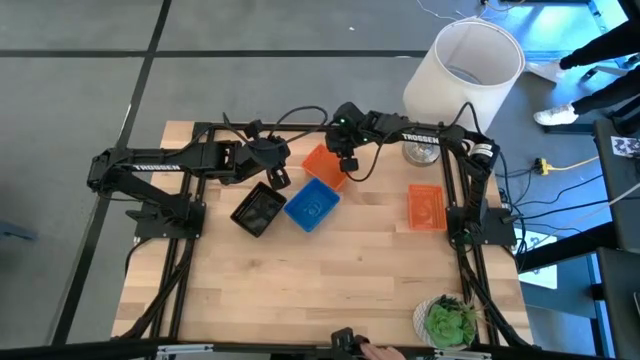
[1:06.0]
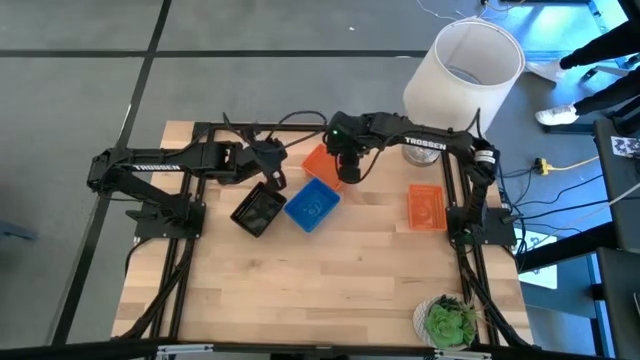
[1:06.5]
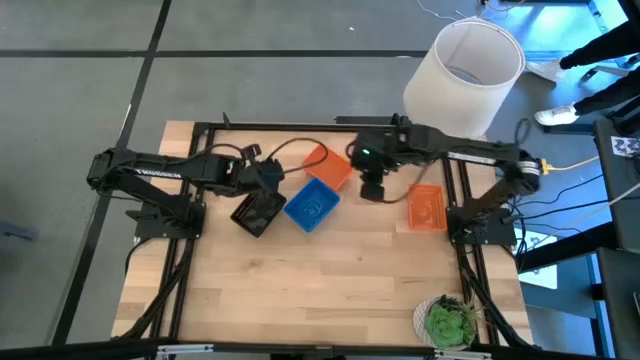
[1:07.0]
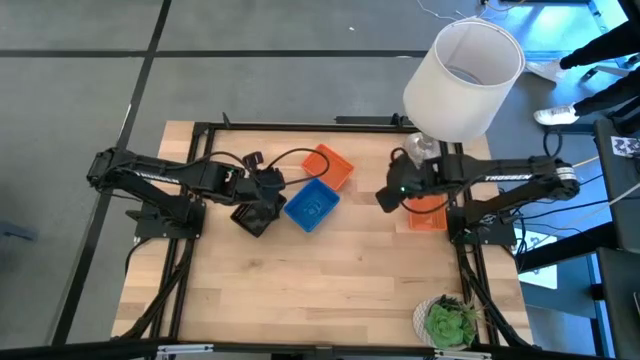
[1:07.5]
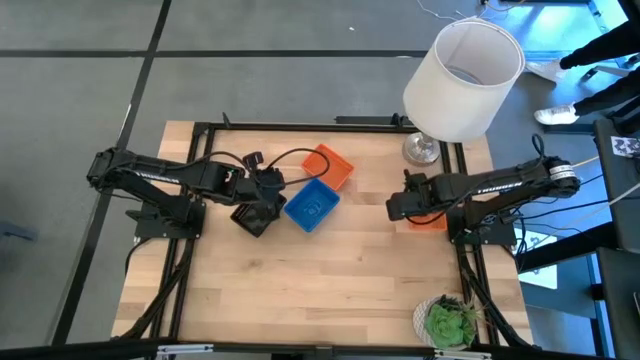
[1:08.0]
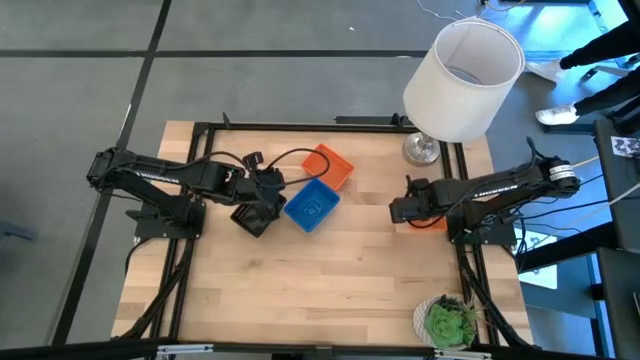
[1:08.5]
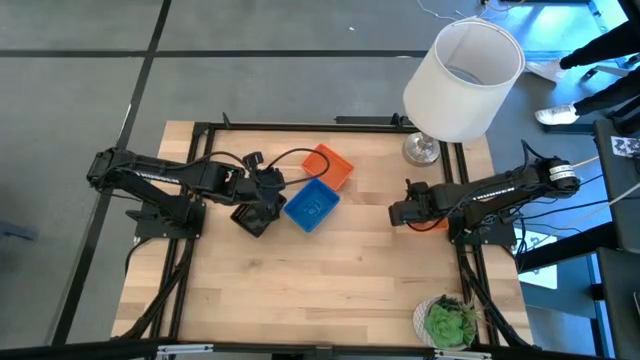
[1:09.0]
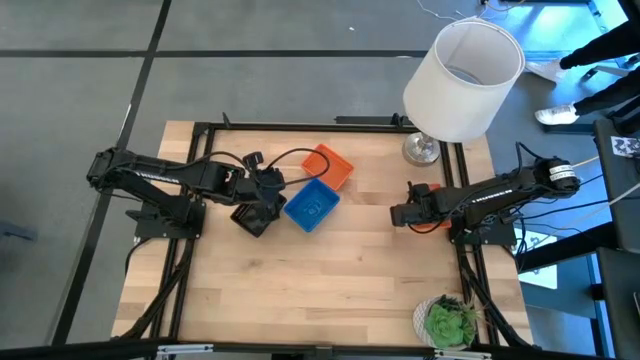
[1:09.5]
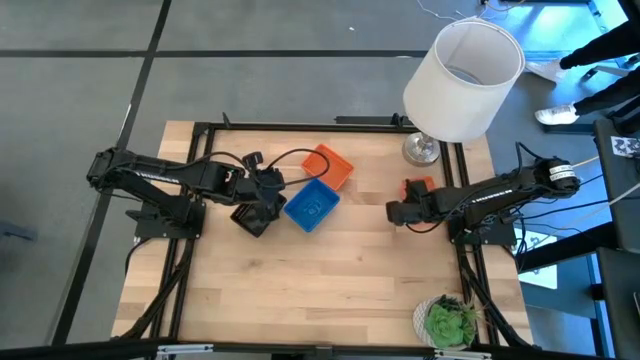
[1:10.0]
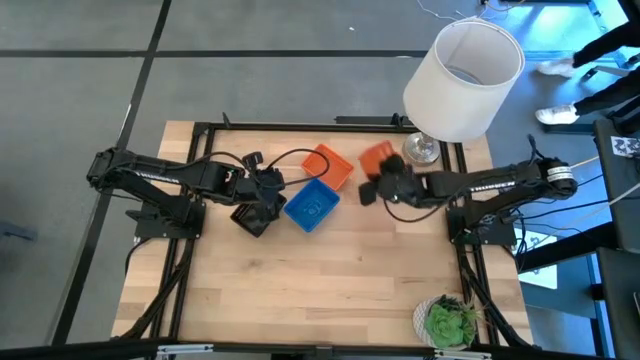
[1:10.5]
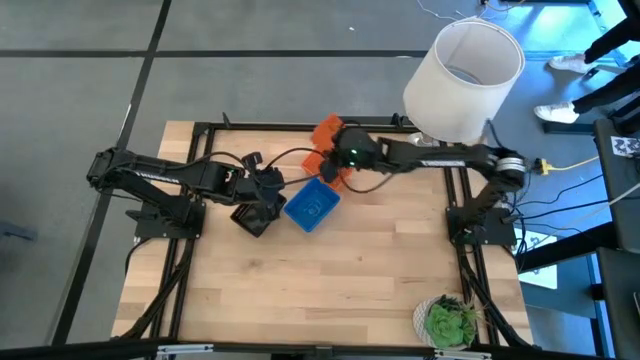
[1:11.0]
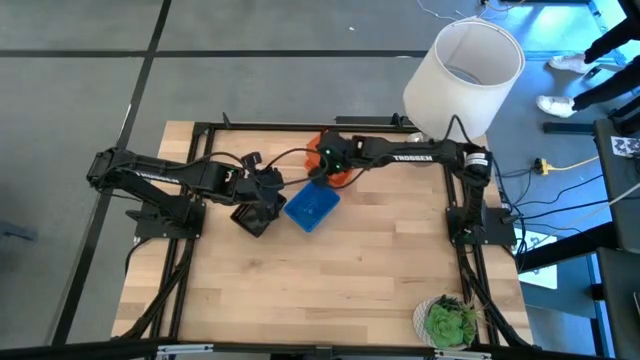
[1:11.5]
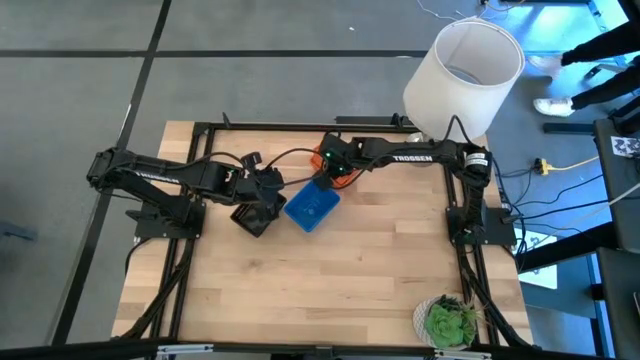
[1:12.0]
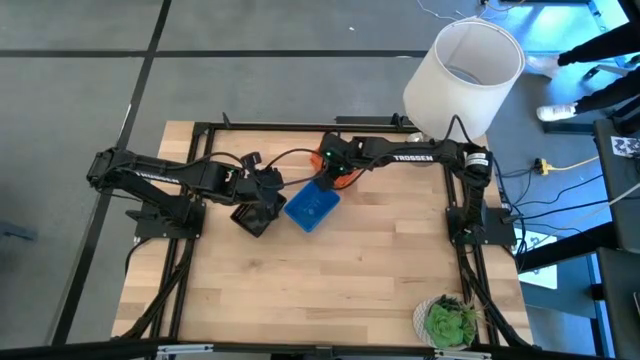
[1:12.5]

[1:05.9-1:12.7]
Stack the right orange bin on the left orange bin

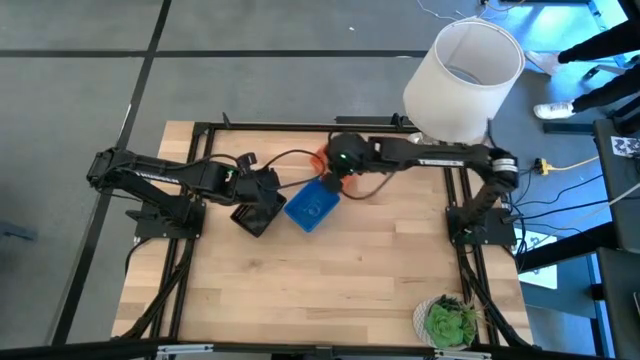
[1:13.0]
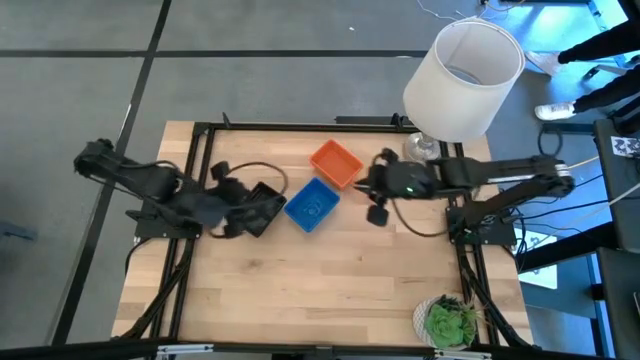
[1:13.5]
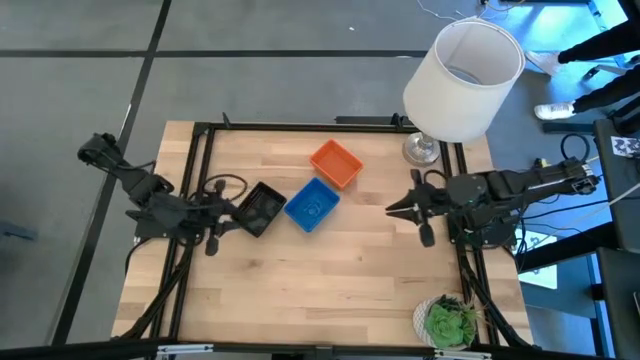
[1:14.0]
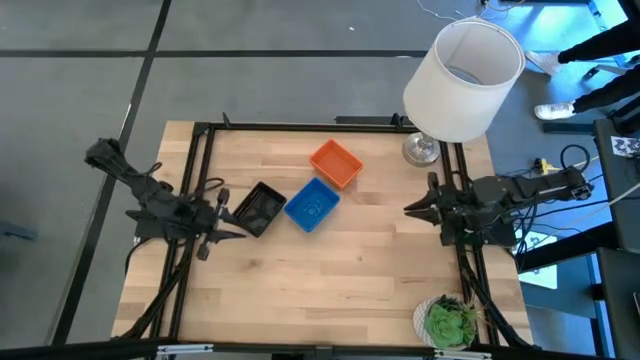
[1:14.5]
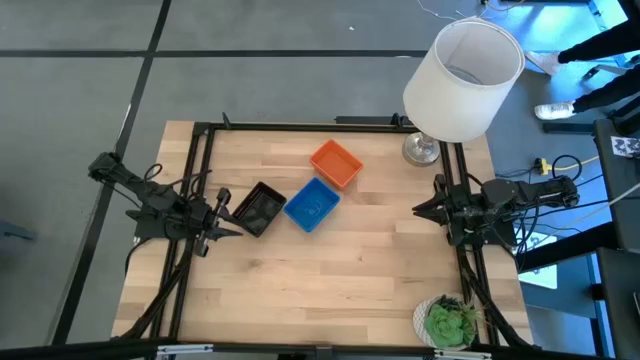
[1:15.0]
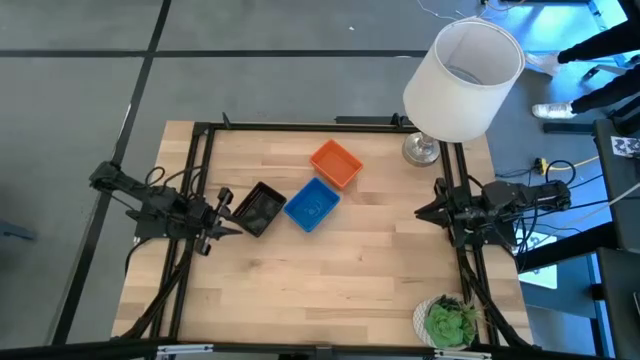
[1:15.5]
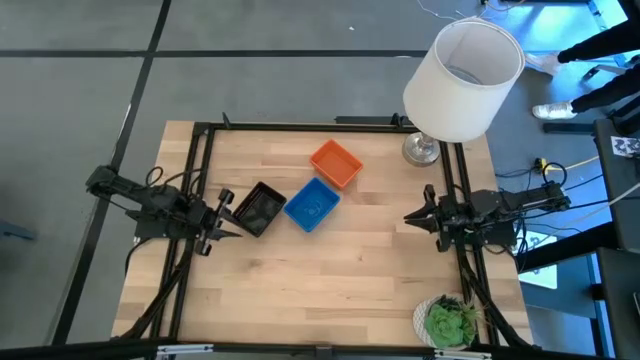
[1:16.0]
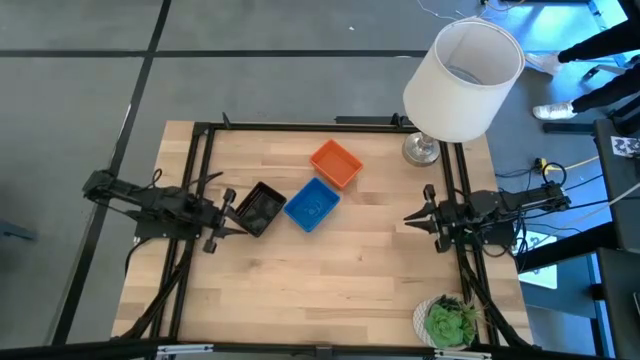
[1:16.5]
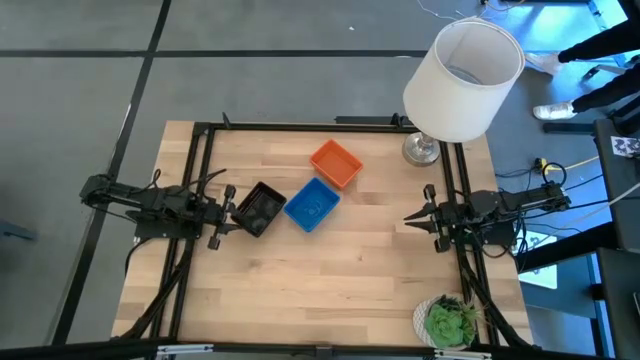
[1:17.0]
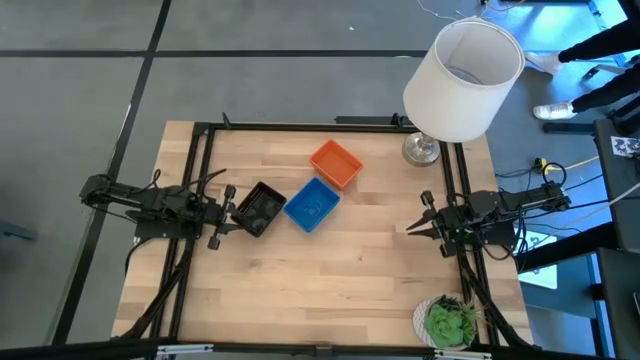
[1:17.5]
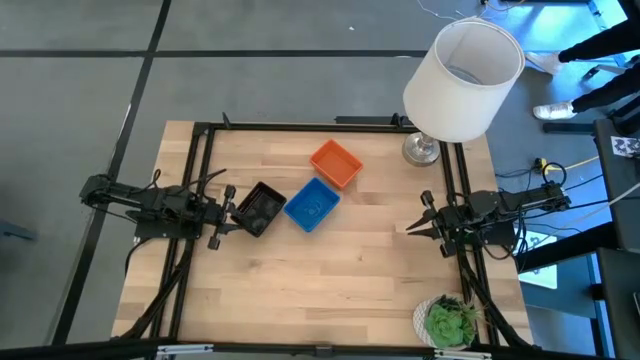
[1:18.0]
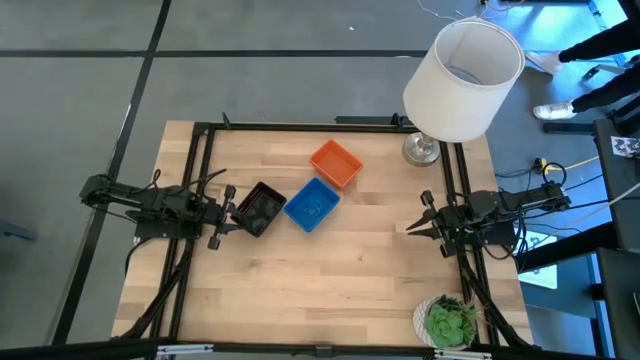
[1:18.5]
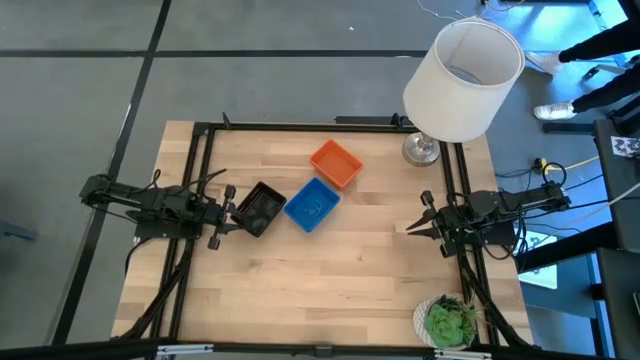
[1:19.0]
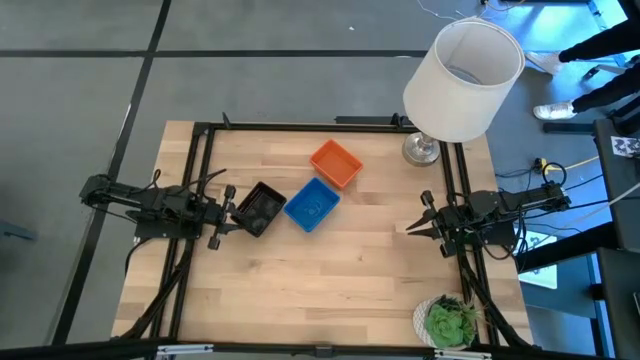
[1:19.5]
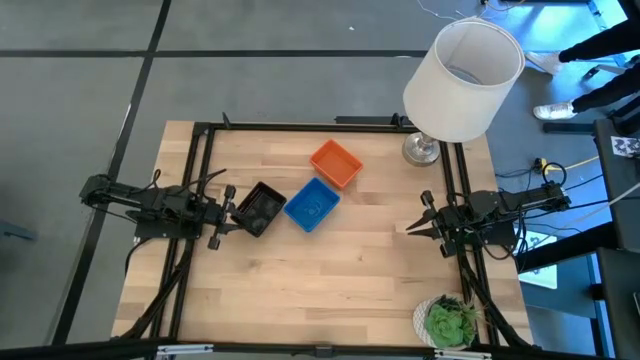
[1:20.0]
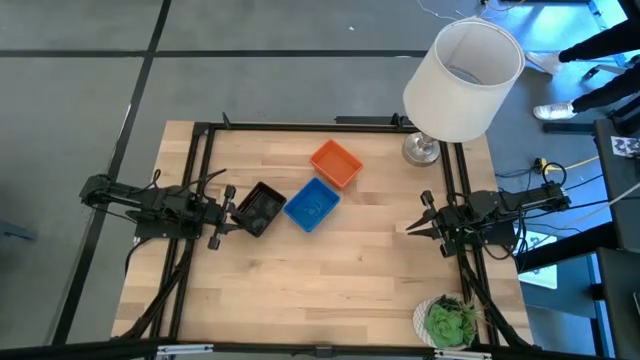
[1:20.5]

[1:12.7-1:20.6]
Return to Home Position
